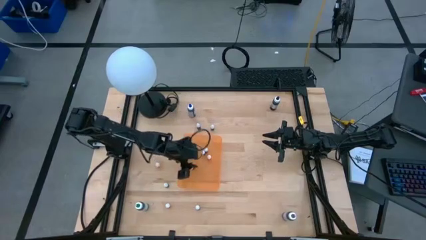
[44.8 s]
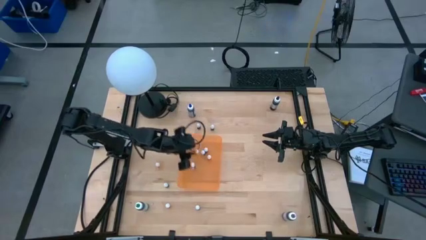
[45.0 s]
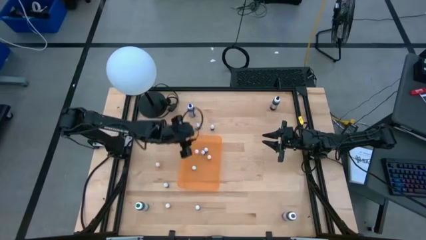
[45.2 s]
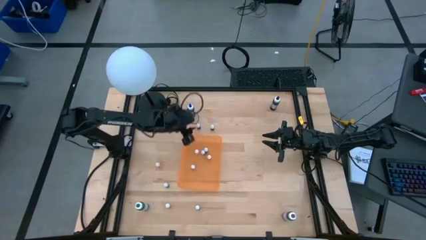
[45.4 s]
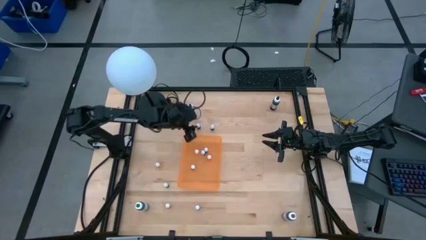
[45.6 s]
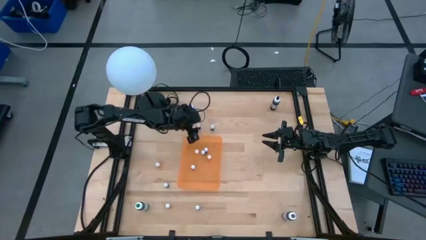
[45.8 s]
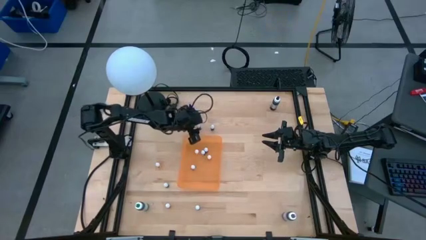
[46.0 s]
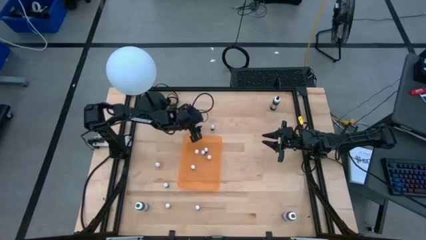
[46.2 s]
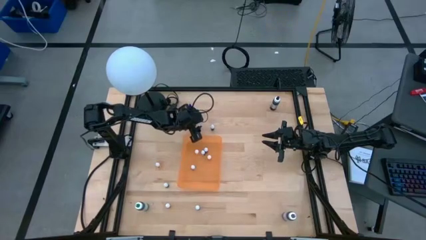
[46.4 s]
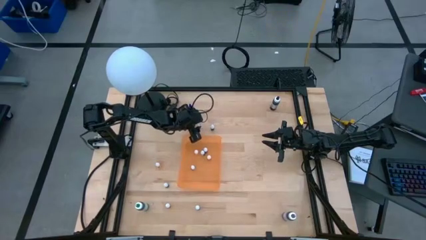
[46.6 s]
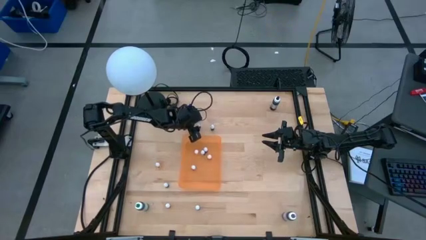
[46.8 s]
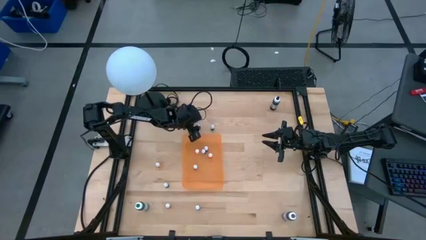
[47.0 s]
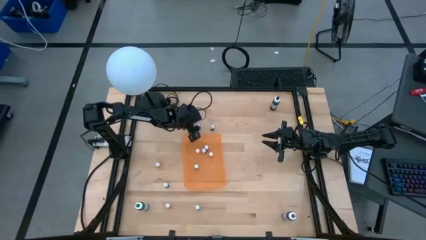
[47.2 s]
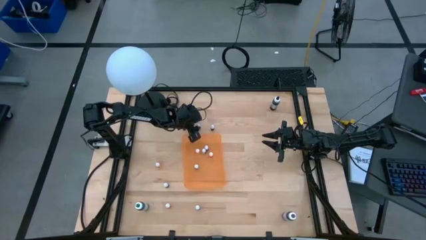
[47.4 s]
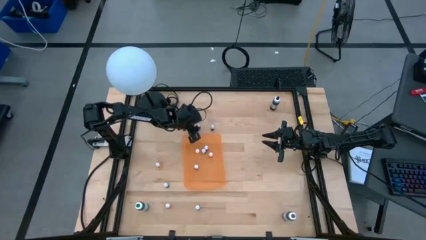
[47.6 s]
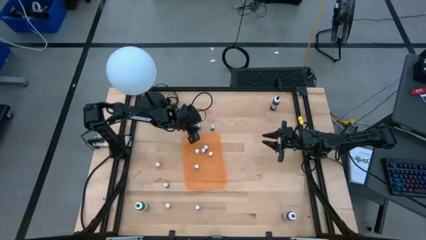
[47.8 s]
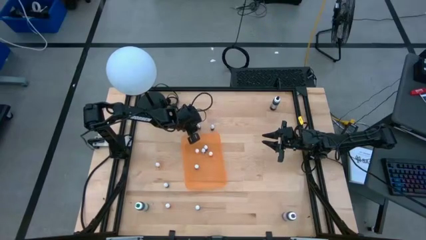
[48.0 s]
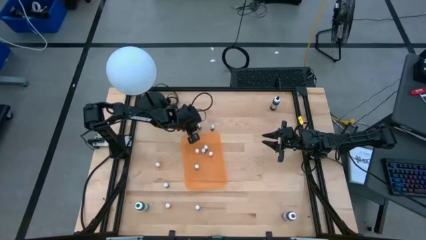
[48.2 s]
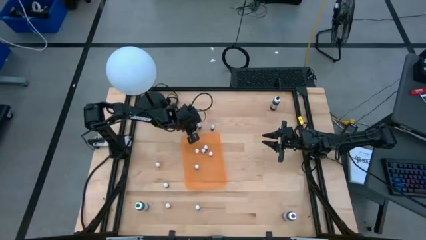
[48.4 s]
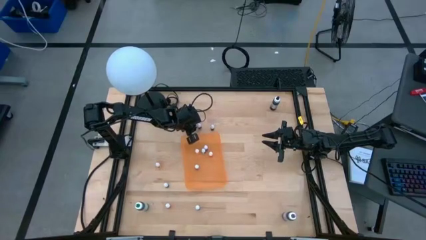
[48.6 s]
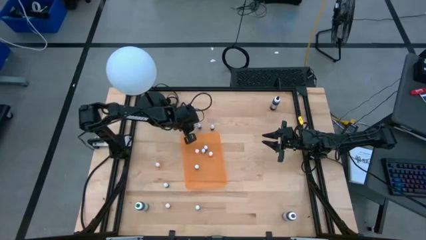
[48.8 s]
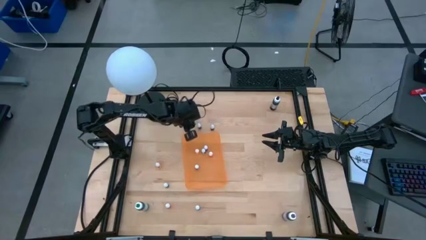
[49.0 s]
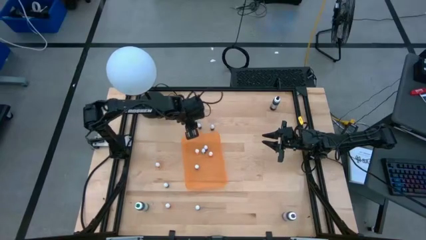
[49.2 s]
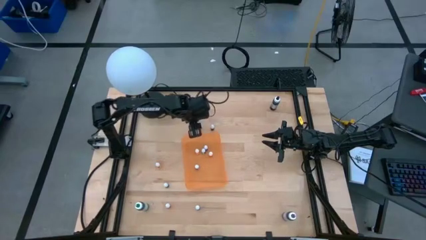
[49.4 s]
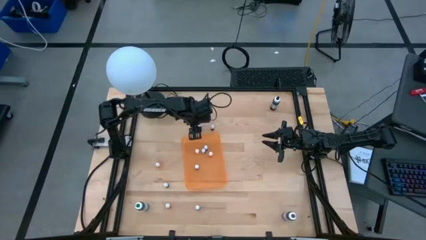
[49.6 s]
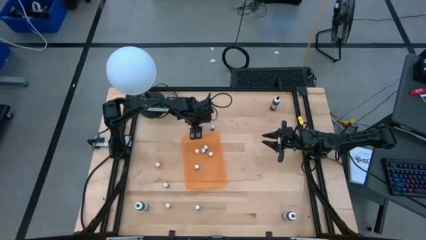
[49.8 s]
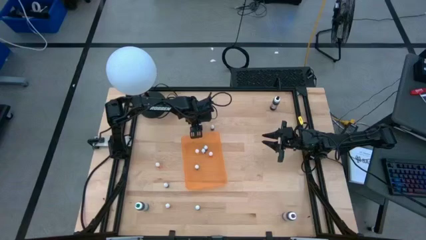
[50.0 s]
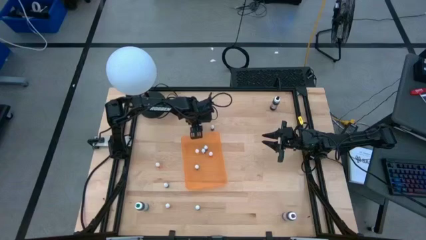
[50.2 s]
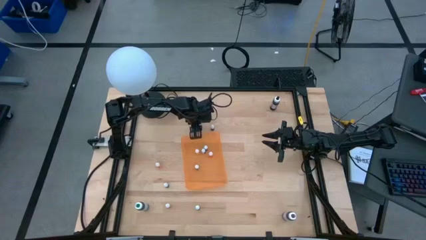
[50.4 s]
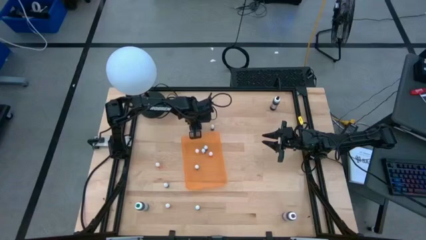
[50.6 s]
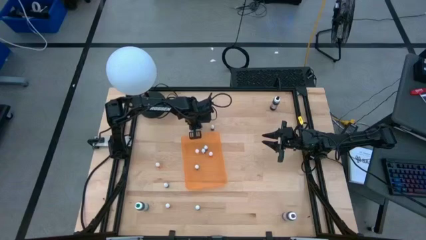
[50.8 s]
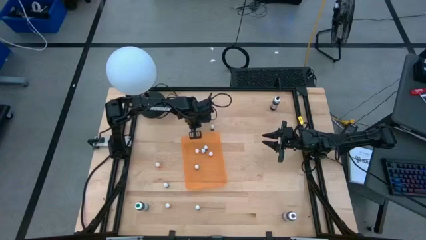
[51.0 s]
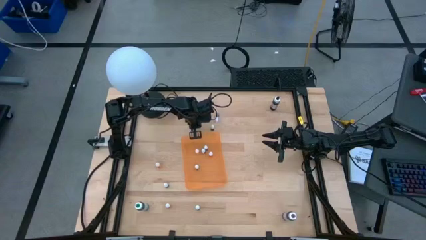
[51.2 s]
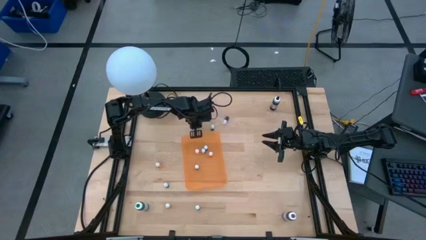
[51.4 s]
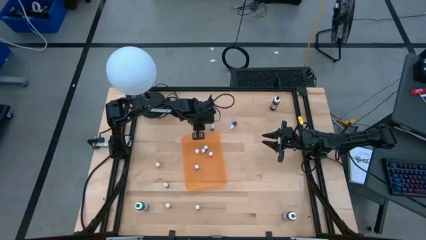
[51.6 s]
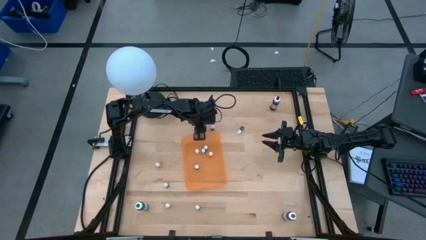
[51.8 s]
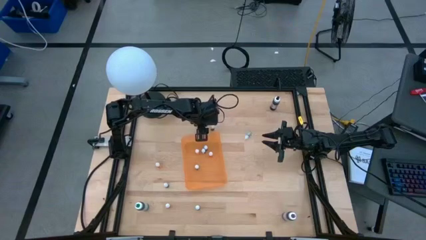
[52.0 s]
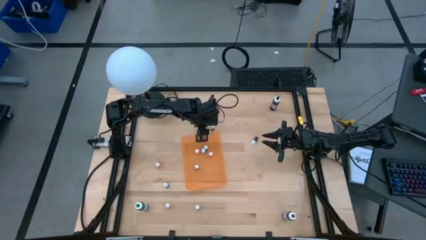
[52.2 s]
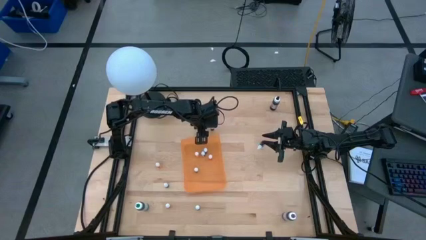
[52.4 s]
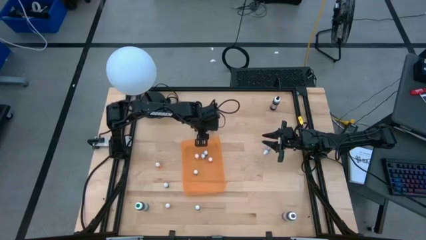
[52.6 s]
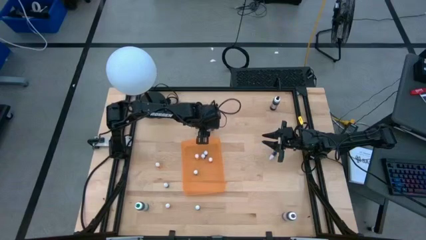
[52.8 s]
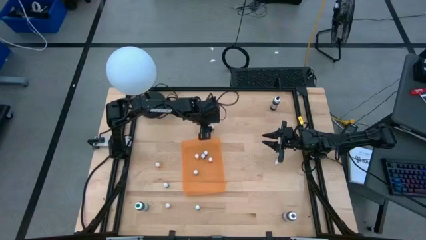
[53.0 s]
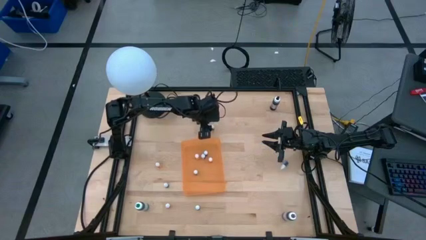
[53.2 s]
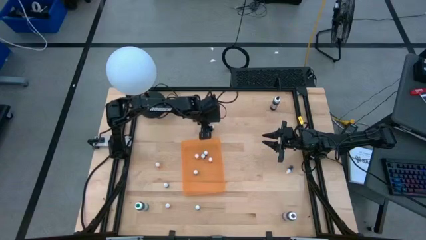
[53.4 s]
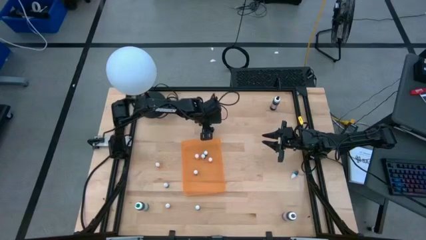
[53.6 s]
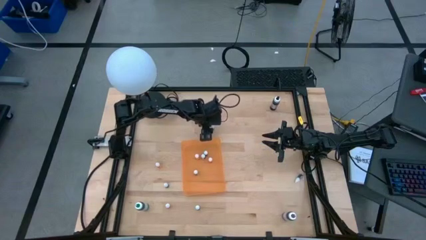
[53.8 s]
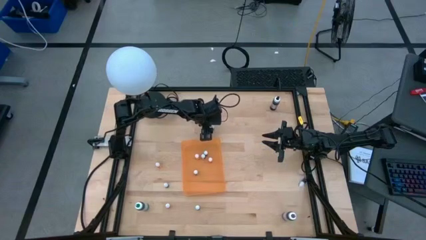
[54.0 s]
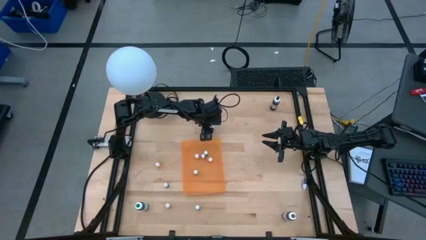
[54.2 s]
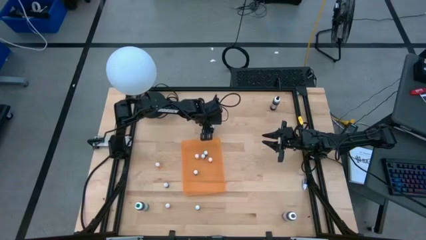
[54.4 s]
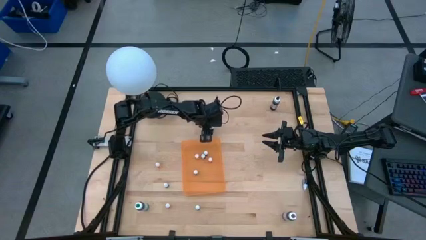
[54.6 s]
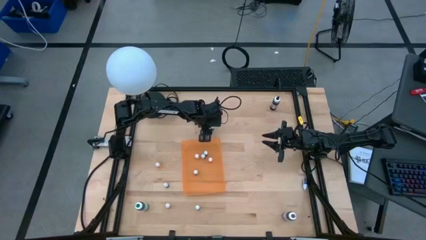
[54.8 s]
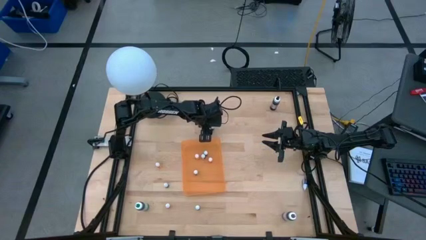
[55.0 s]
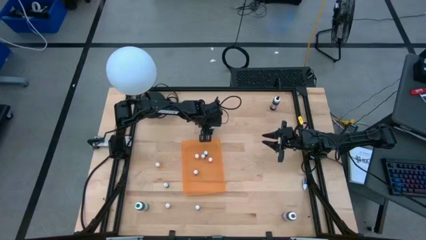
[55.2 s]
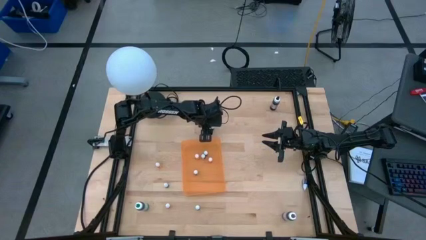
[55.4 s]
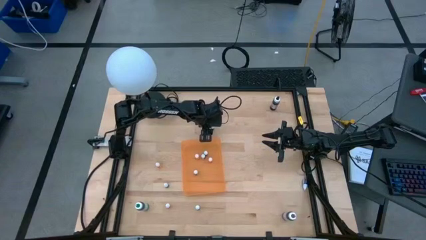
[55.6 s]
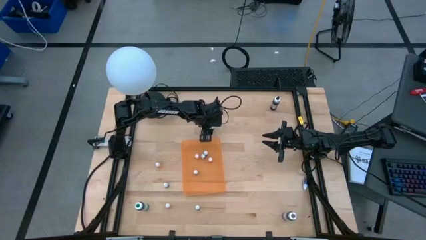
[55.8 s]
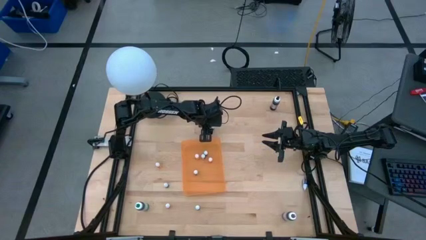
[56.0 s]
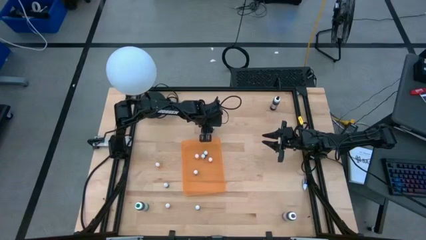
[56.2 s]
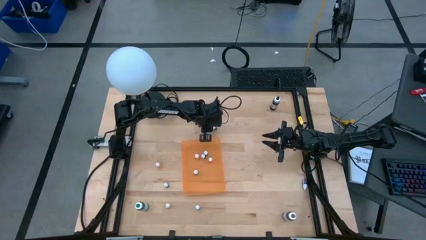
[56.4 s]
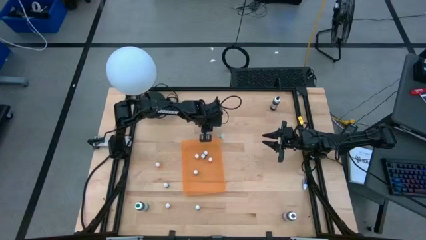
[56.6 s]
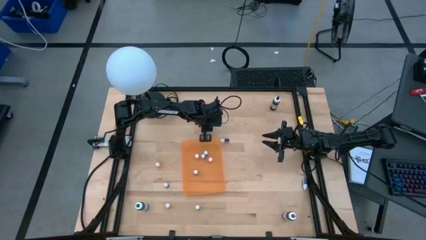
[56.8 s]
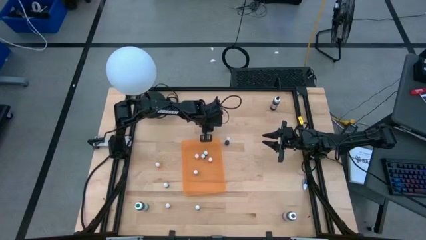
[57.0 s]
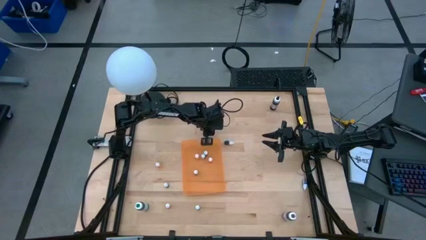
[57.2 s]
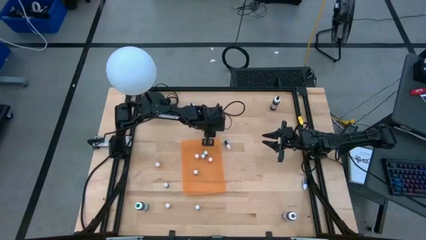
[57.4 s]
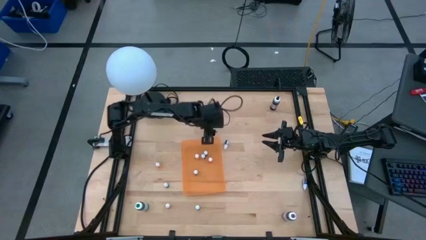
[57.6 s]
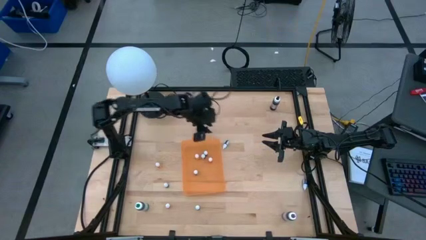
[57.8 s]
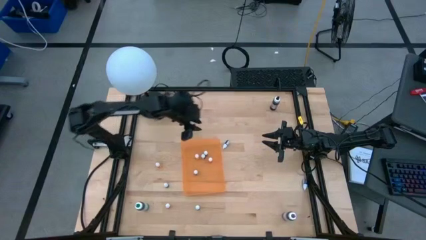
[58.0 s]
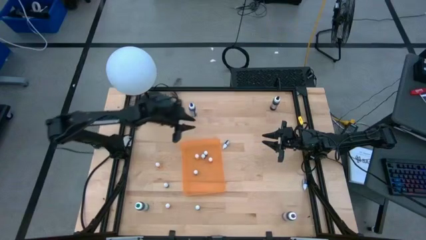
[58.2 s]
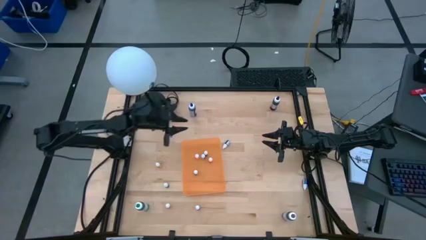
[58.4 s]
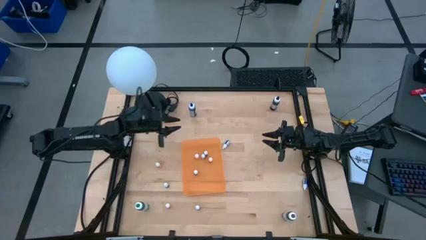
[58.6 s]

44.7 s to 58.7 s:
Task: Pick & Place food coloring
Put the small black food coloring bottle into the orange bin

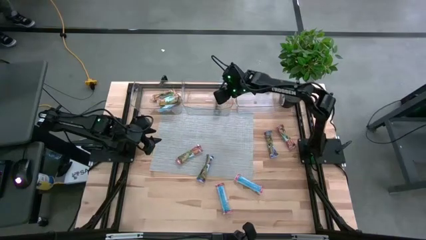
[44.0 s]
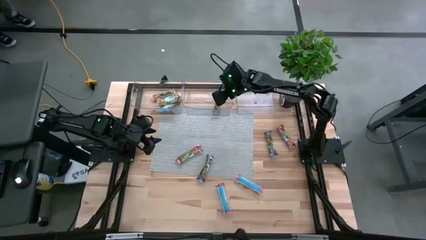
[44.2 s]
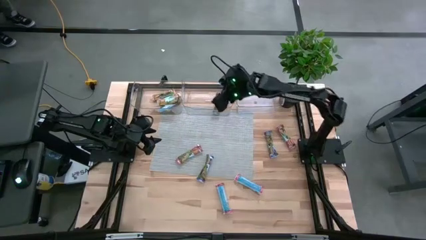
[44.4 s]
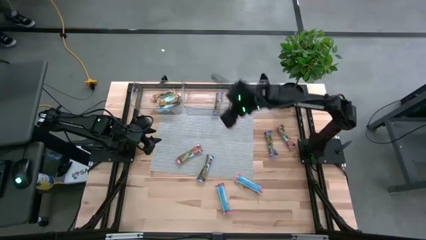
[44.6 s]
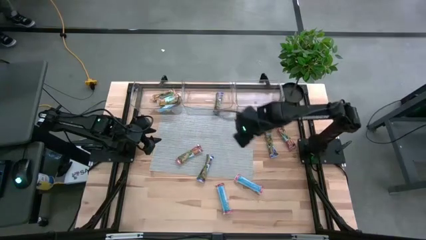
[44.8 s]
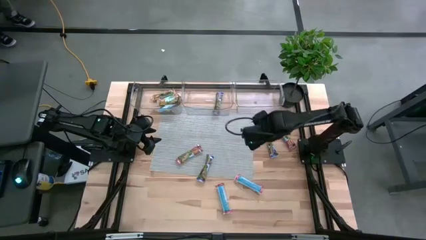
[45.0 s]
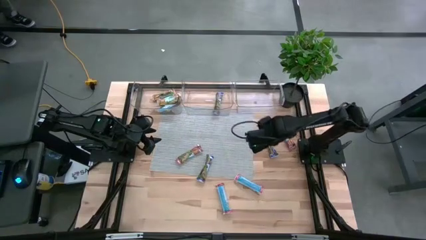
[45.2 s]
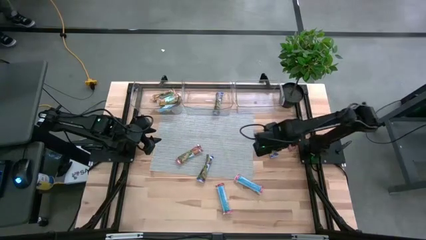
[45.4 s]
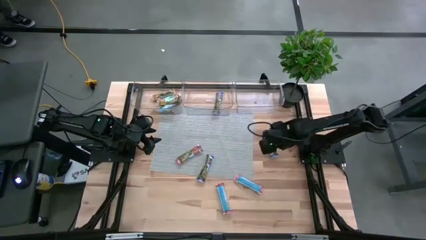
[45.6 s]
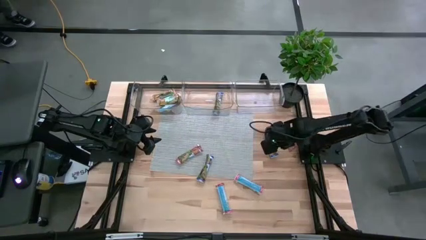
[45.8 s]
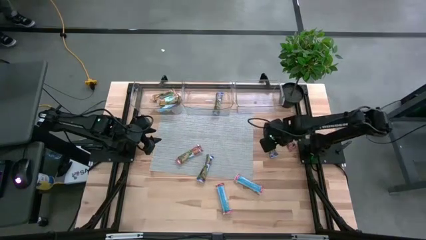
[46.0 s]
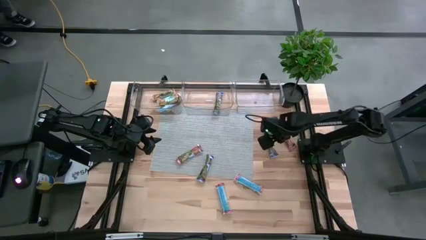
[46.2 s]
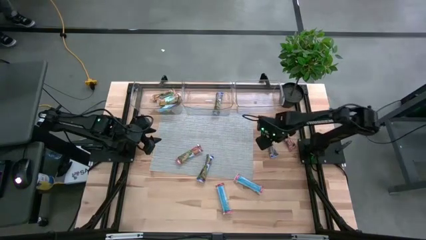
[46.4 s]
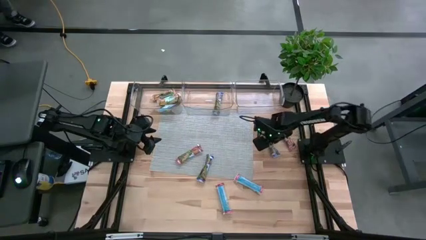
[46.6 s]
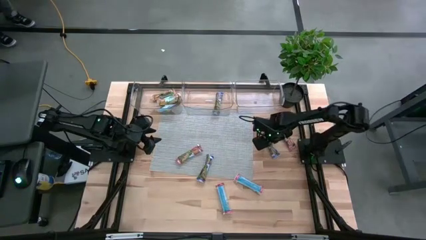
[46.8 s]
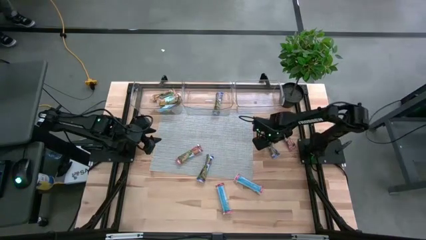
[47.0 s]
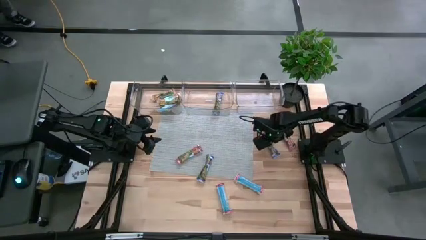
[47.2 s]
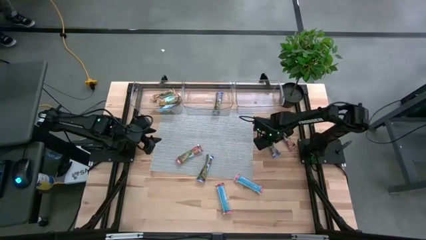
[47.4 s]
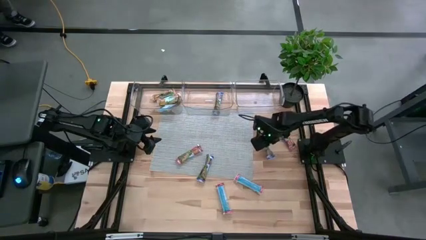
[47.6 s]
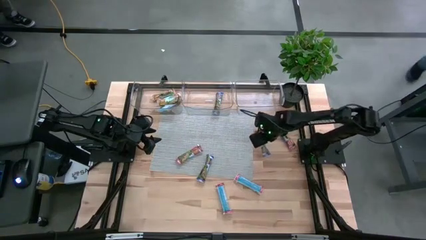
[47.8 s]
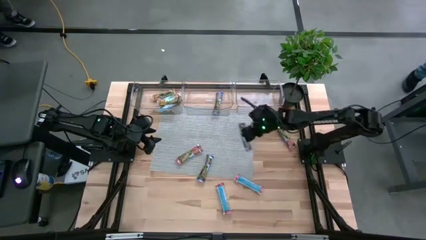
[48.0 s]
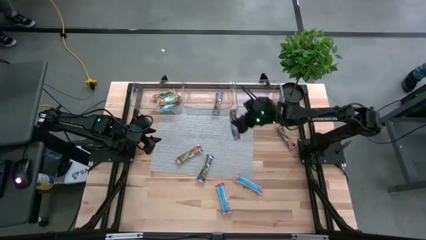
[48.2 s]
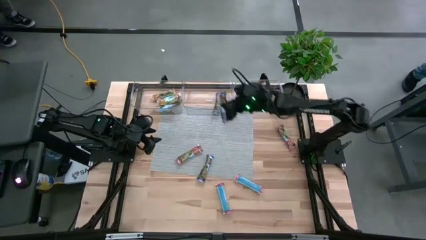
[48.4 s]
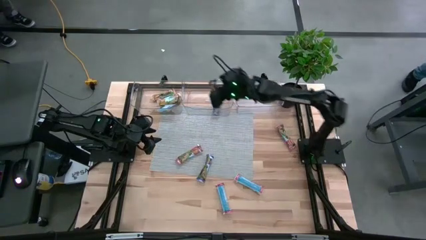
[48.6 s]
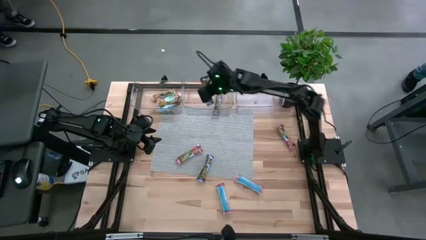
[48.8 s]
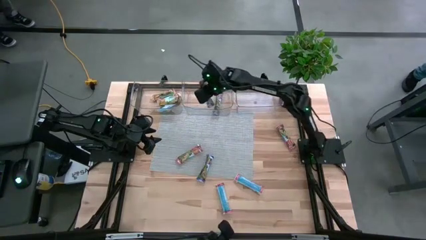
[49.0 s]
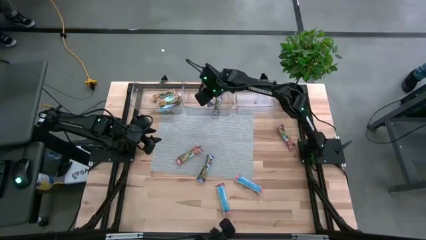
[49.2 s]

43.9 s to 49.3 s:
Task: Pick and place Granola Bars by type
Put the blue granola bar into the middle transparent bin
